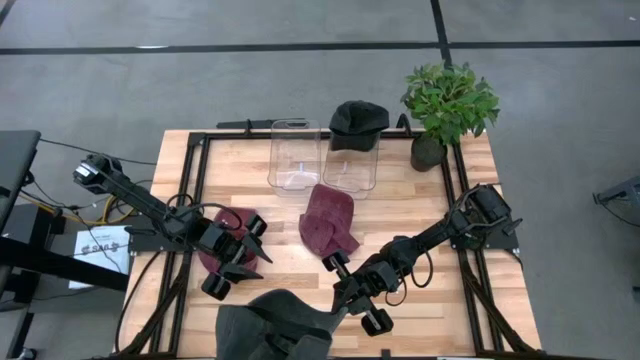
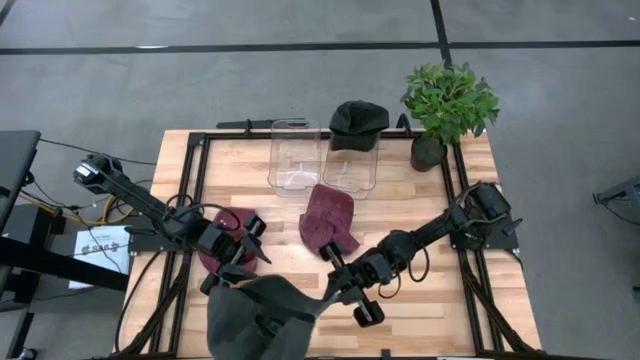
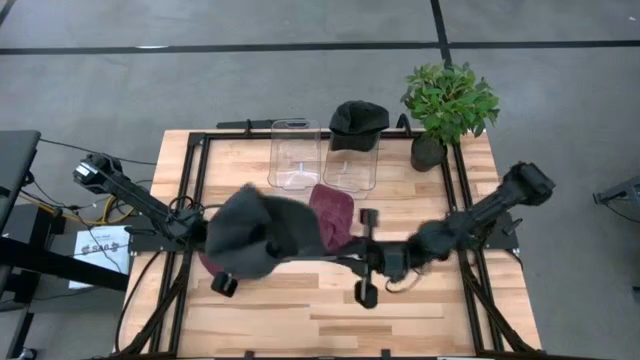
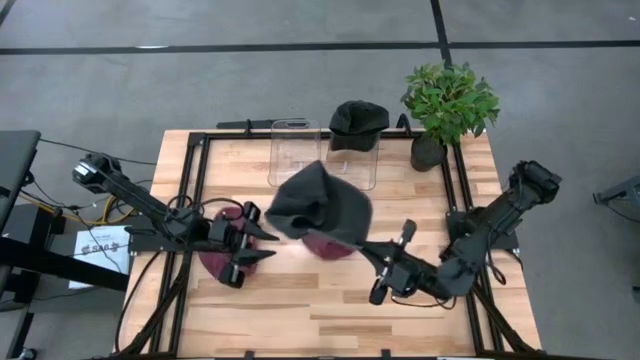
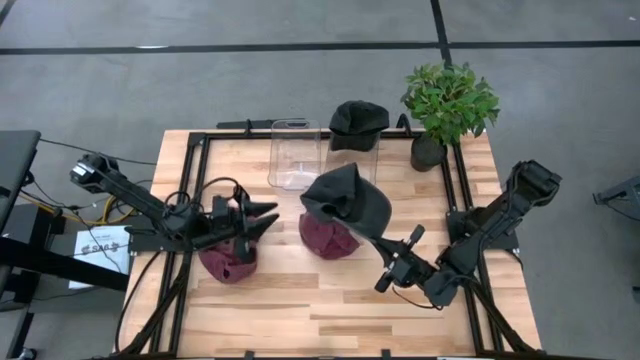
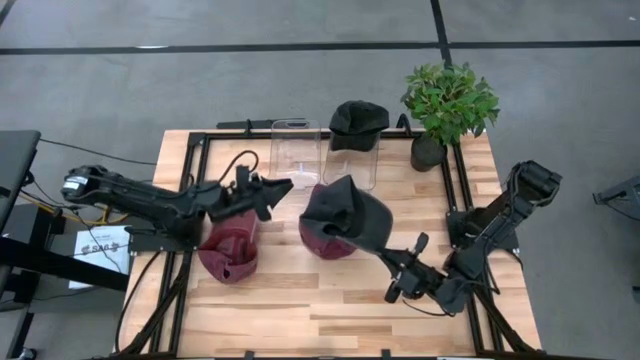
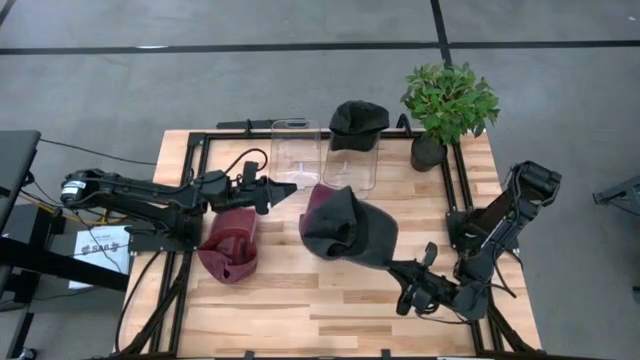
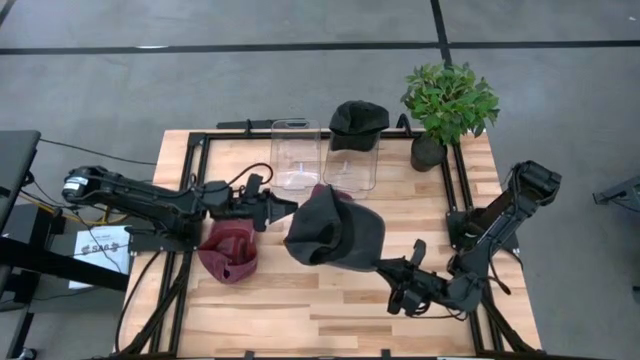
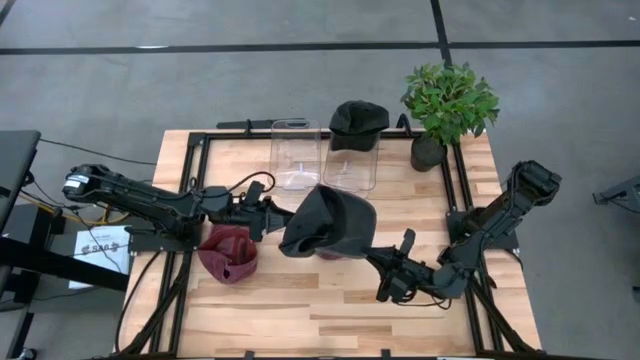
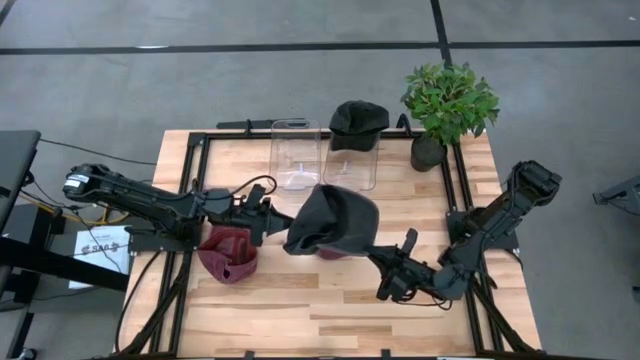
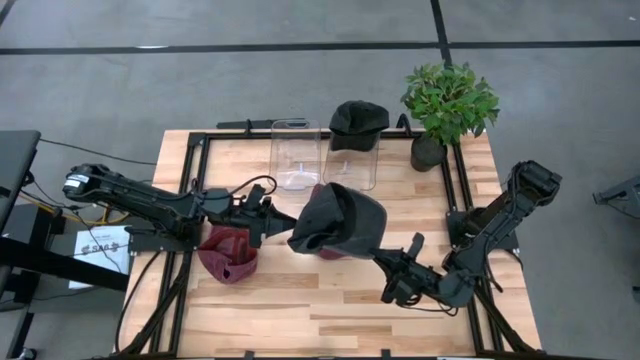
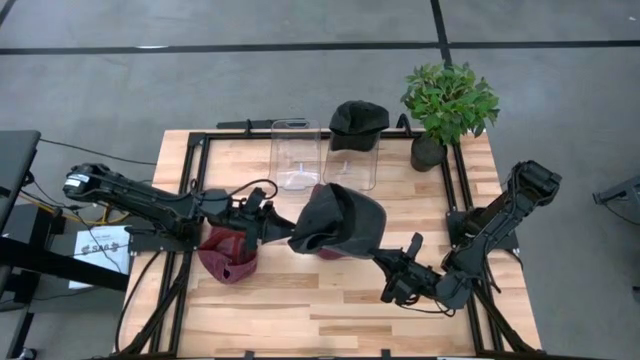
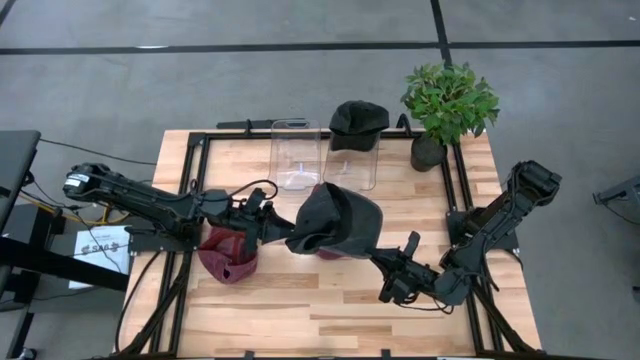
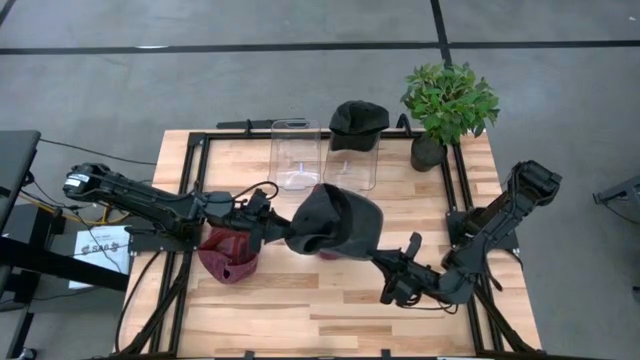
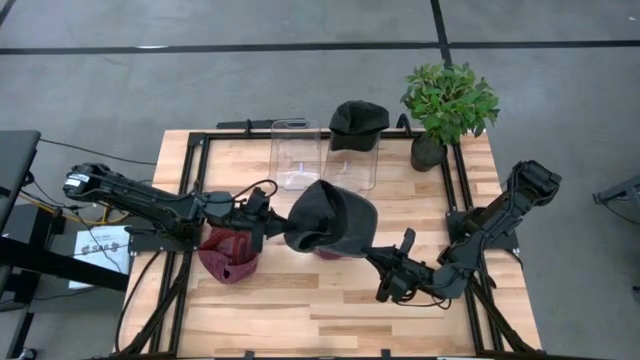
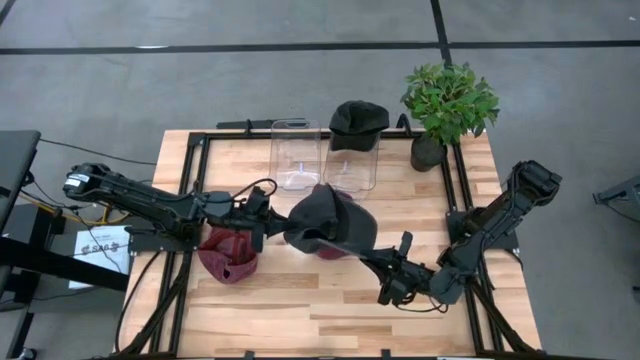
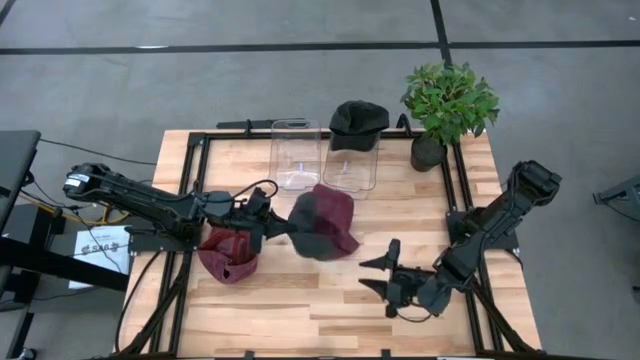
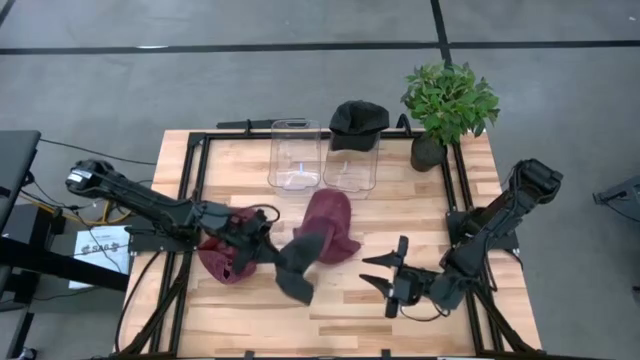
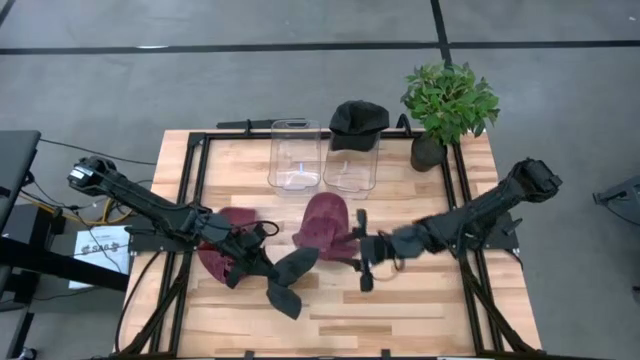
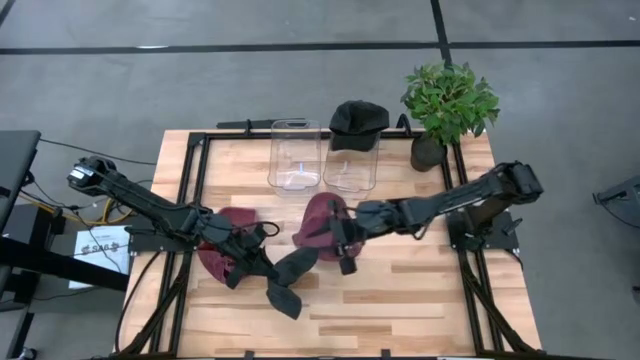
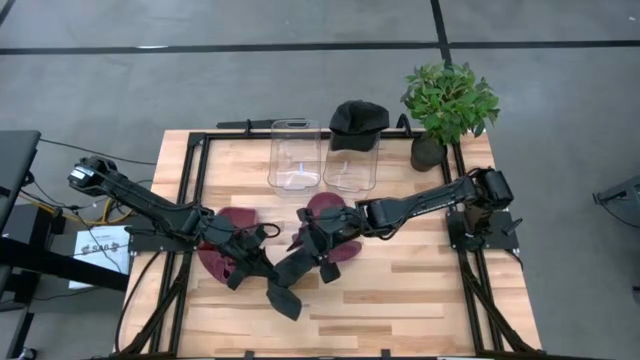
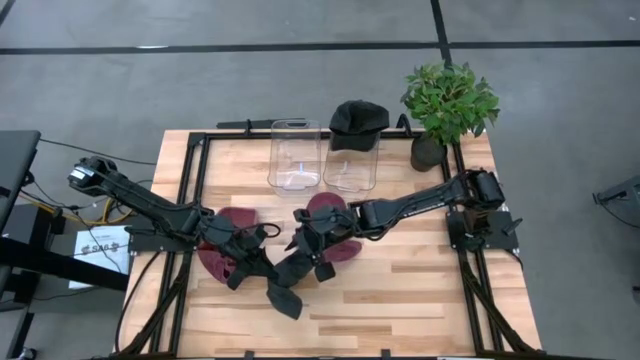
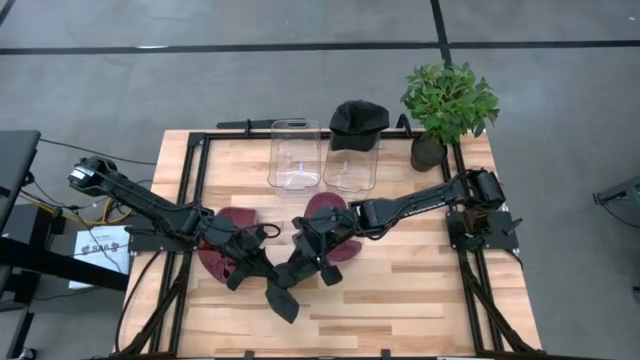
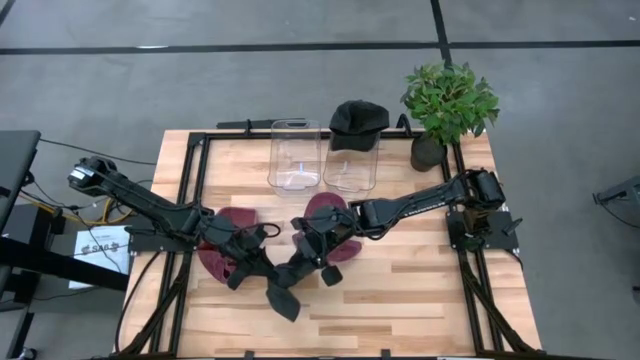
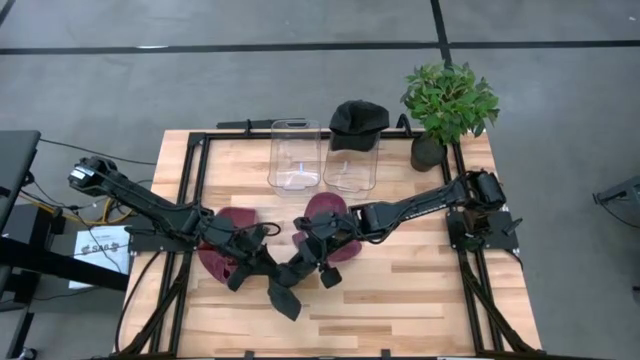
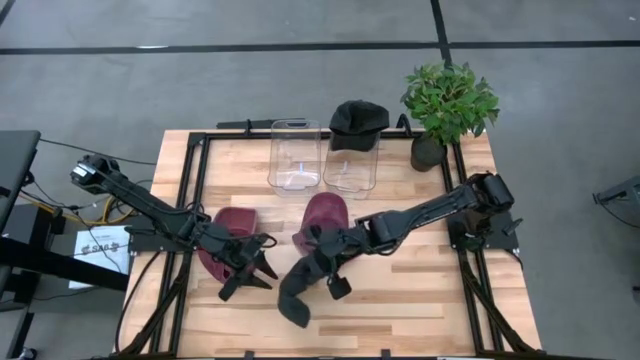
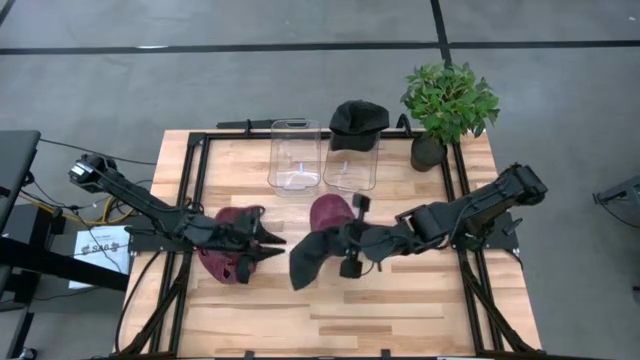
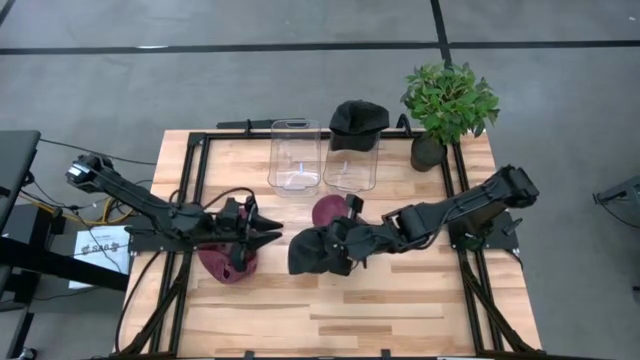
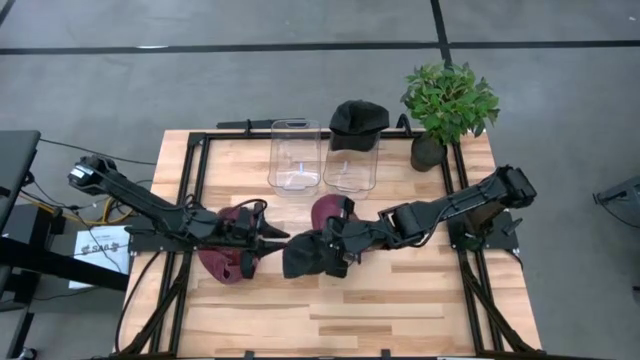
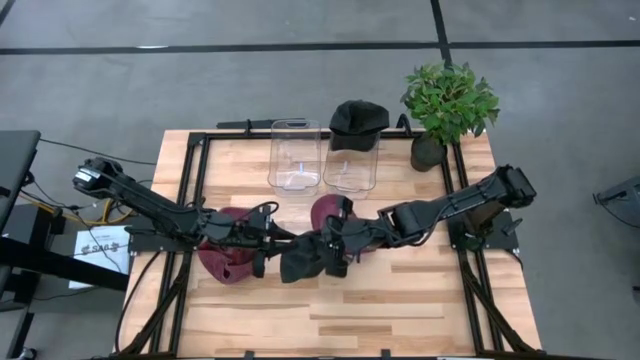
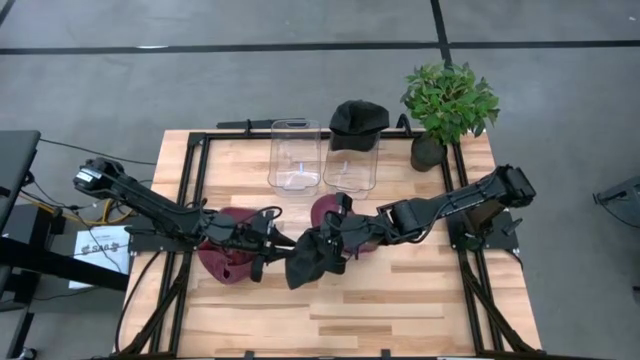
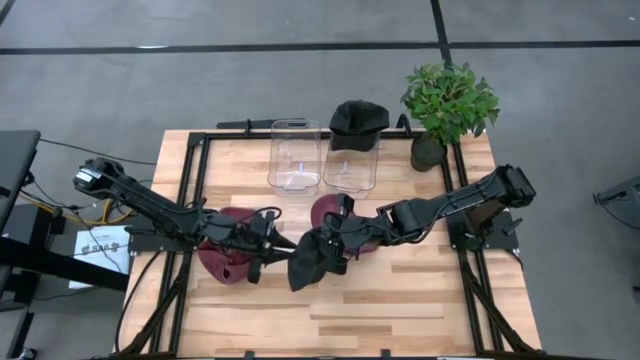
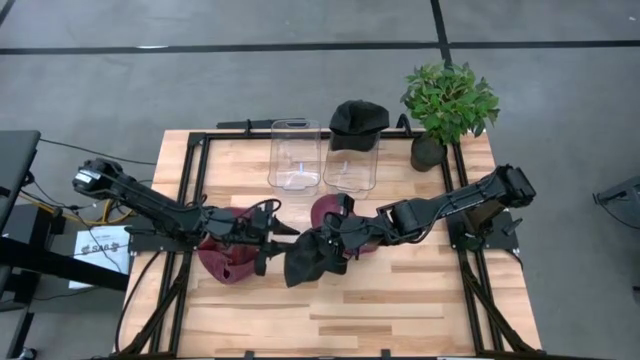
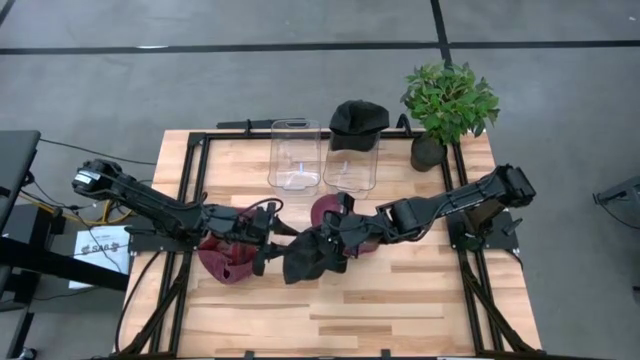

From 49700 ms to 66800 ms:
Task: Pick & Place hat
Put the black cap into the right transparent bin
